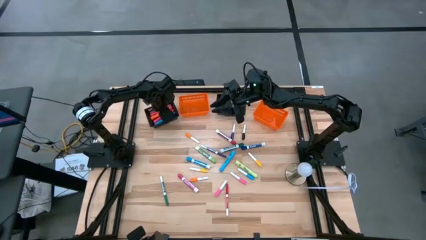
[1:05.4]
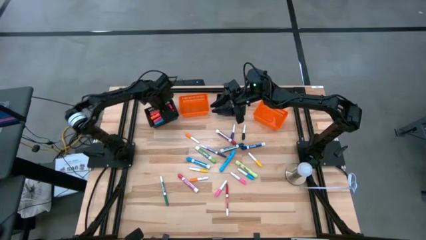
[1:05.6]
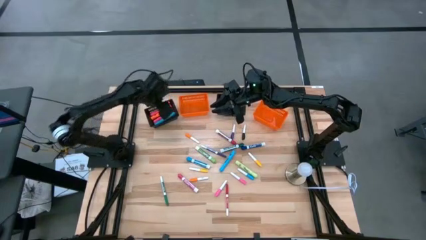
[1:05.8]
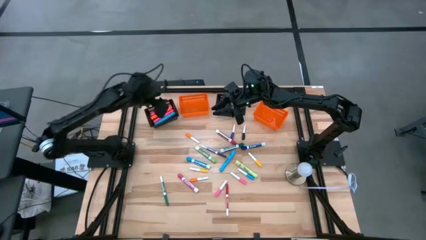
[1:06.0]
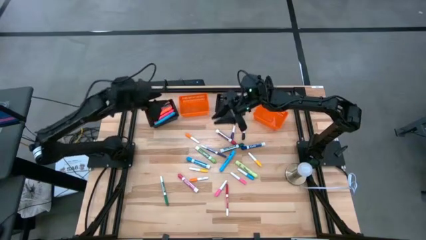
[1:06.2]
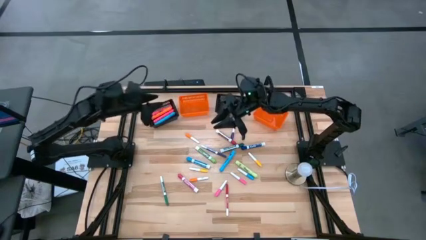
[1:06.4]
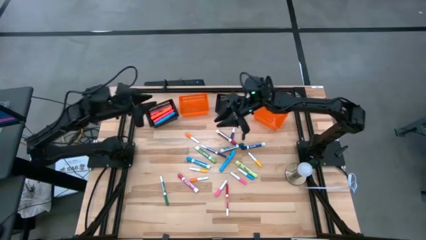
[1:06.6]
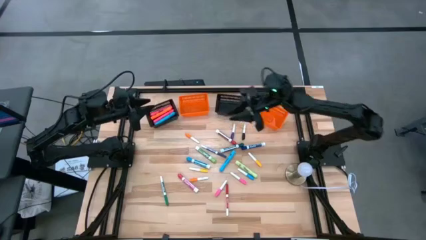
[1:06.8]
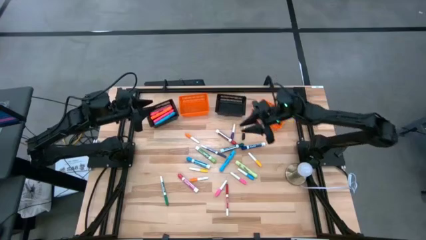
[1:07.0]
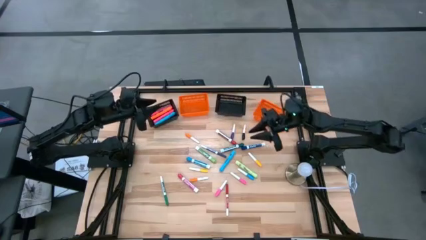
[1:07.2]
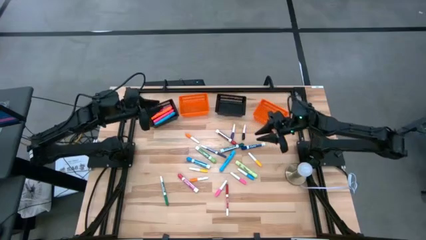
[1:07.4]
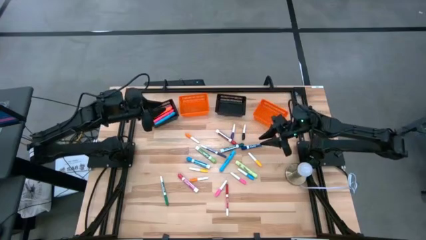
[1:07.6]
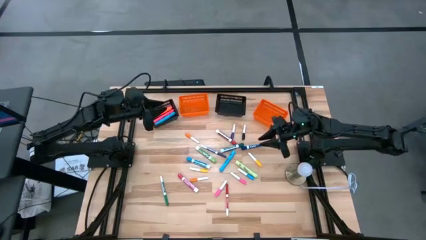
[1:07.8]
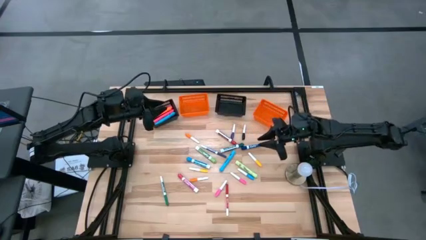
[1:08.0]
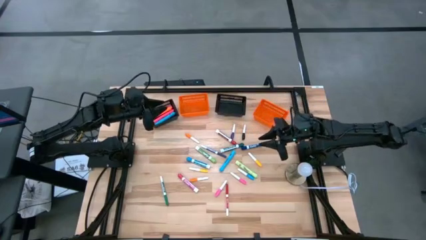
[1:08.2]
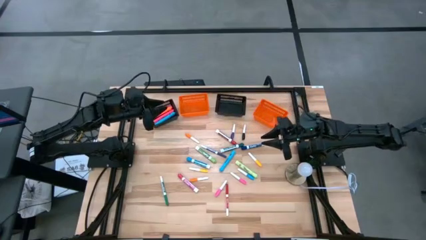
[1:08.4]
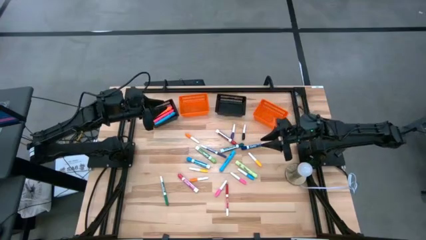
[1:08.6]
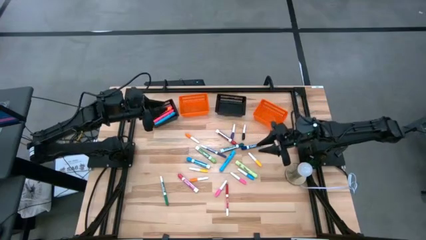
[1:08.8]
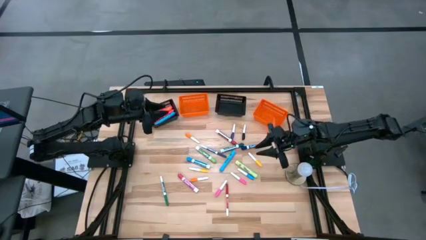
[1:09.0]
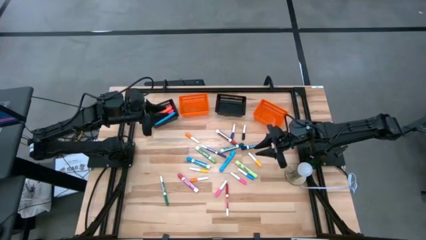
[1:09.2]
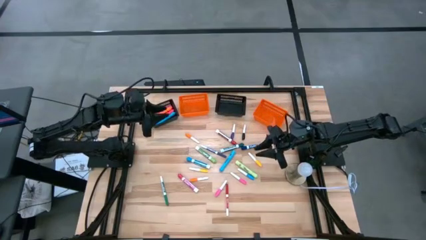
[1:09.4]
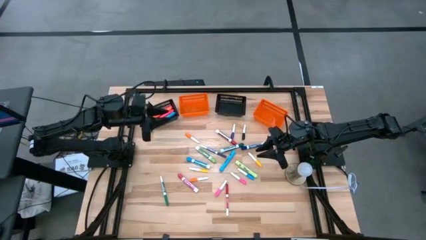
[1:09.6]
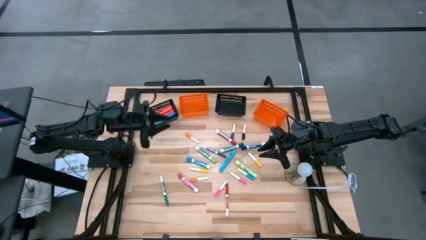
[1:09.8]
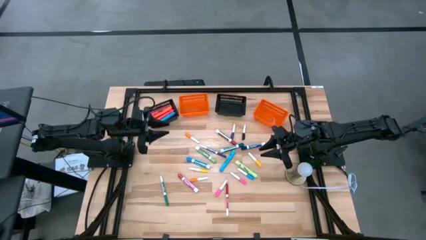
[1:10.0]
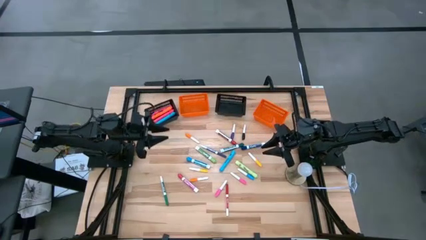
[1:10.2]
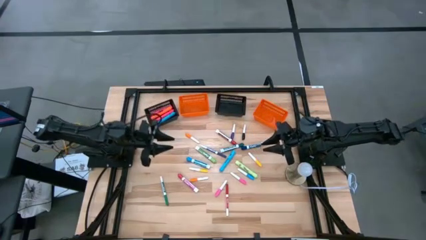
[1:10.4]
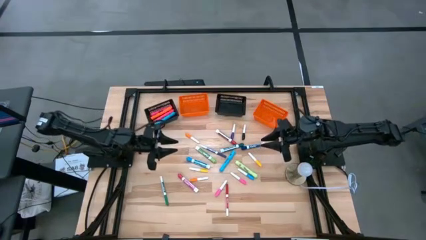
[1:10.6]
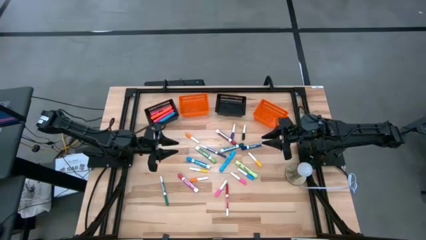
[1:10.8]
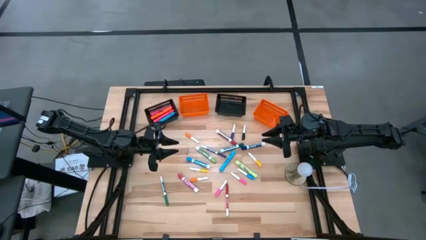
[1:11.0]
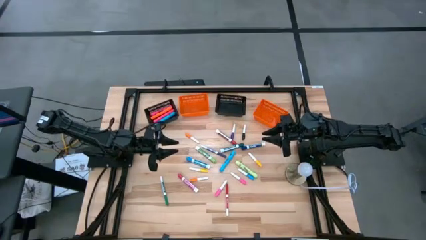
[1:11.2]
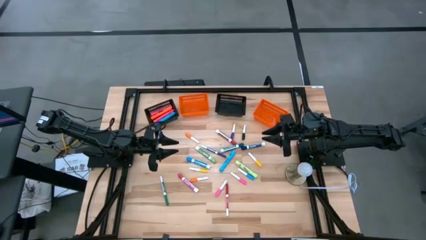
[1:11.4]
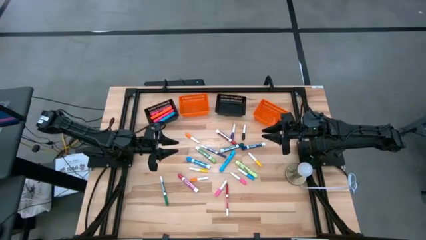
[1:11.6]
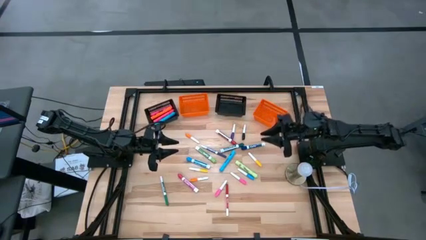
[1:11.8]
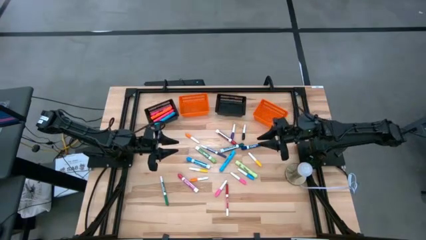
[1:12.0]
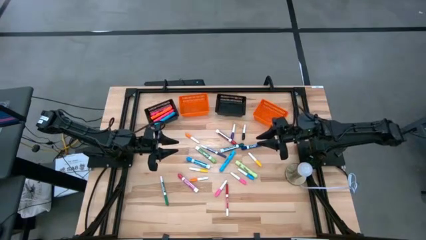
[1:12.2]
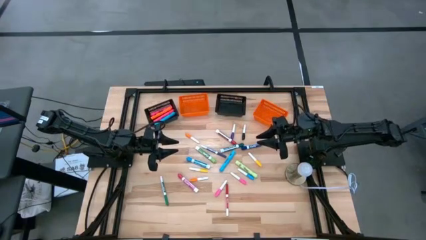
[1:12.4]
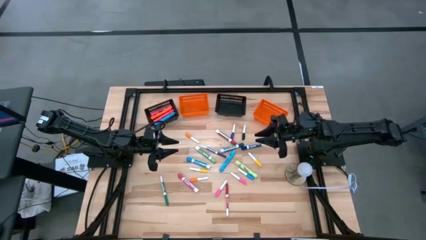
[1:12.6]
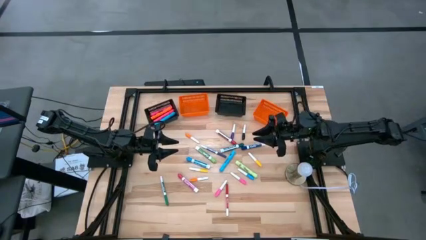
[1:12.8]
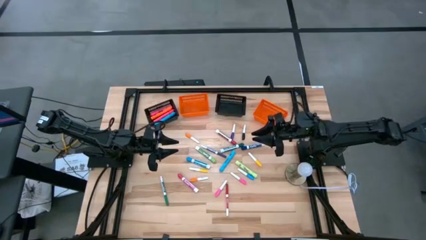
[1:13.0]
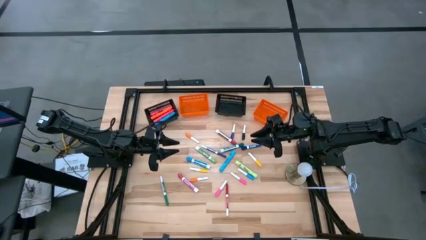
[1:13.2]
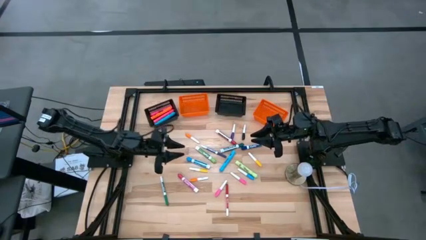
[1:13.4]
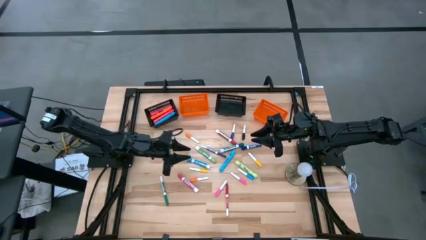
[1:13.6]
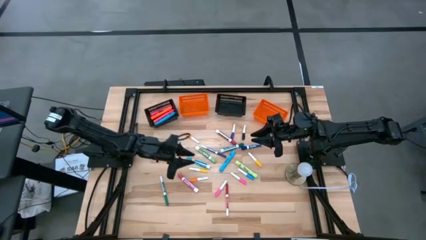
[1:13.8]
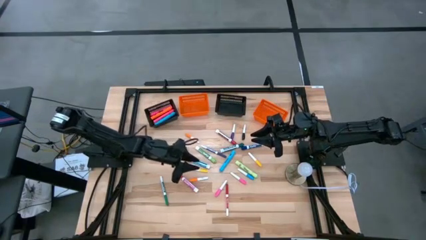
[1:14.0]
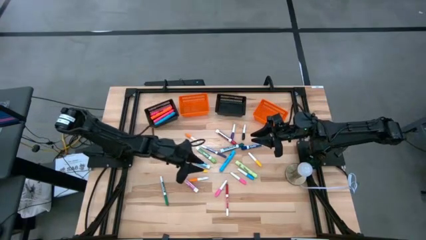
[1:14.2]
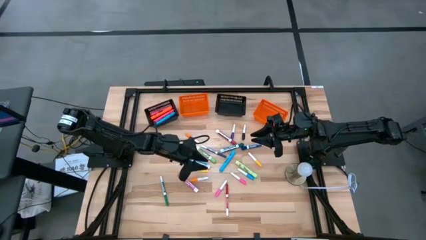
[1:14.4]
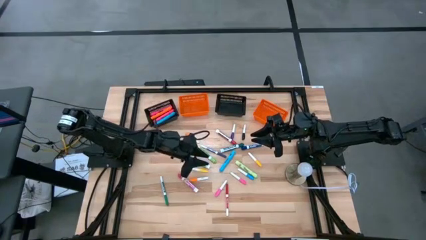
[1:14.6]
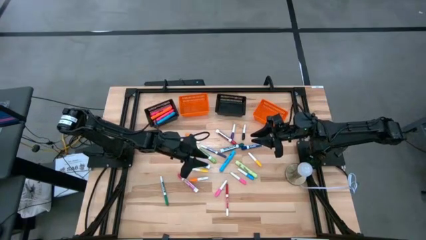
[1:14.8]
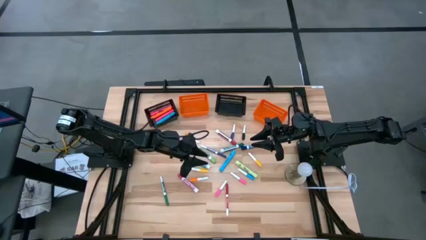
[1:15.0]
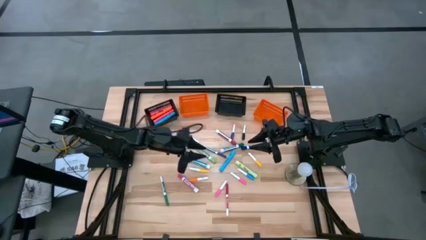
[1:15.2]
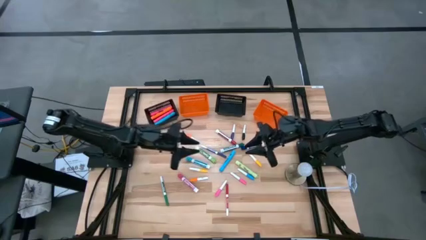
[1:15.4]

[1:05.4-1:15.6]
Task: Pick & Place Markers
Put the blue highlighter pen into the left black bin

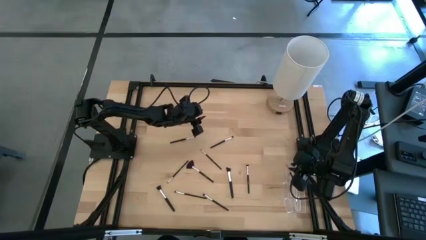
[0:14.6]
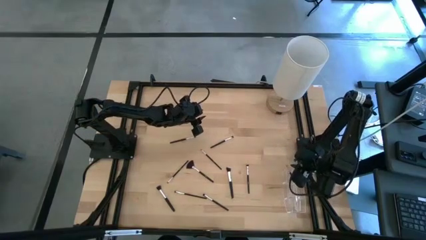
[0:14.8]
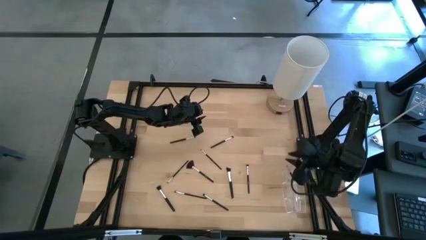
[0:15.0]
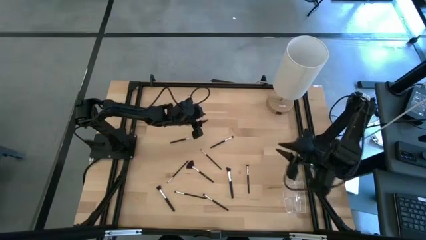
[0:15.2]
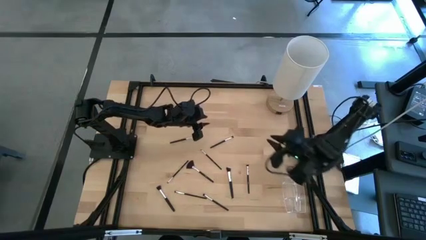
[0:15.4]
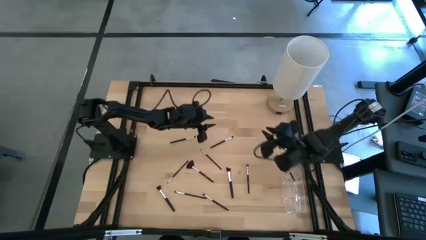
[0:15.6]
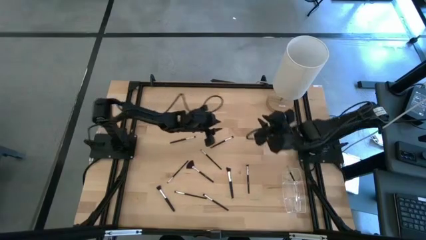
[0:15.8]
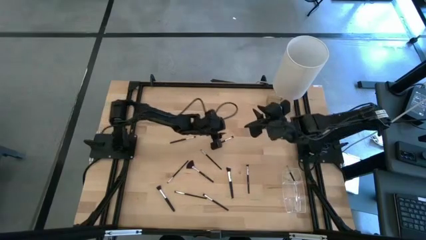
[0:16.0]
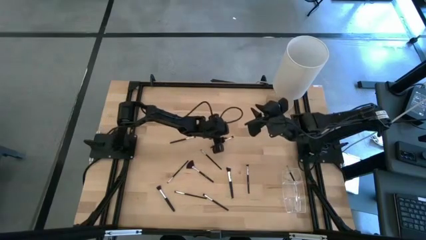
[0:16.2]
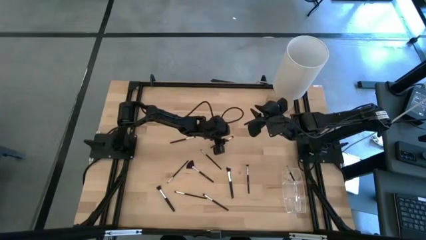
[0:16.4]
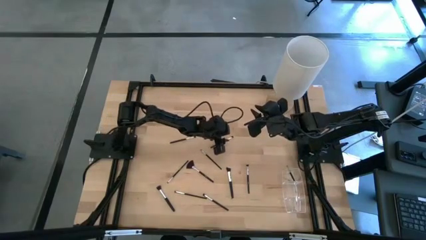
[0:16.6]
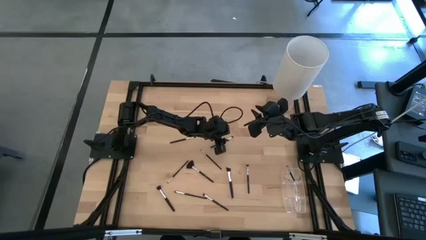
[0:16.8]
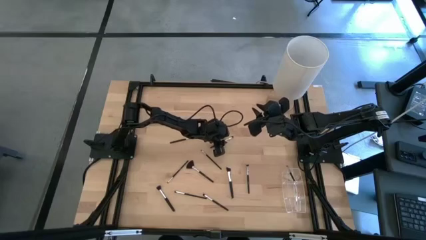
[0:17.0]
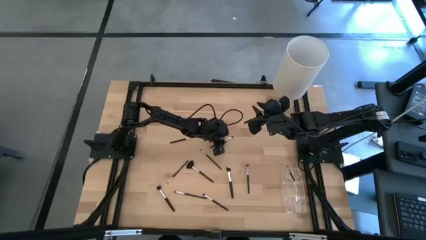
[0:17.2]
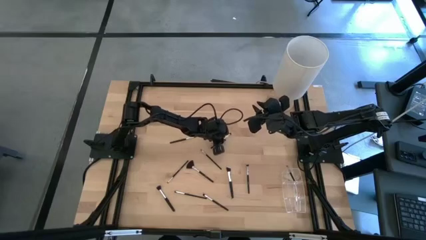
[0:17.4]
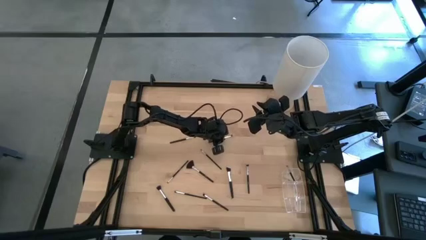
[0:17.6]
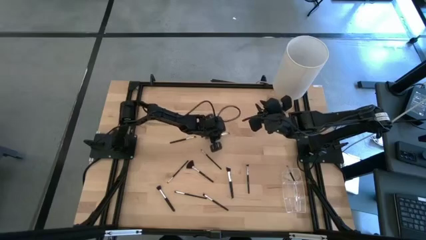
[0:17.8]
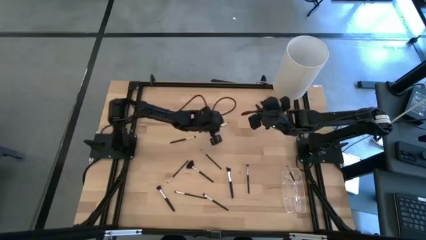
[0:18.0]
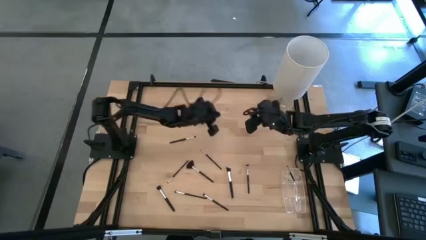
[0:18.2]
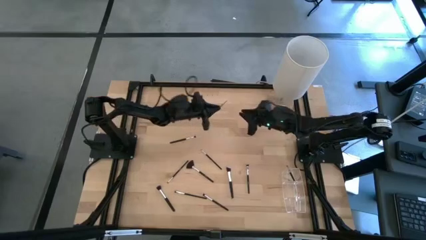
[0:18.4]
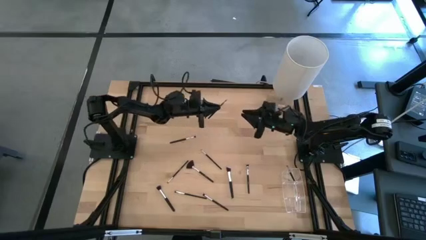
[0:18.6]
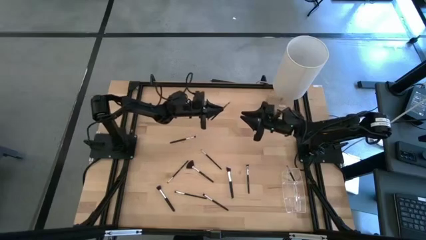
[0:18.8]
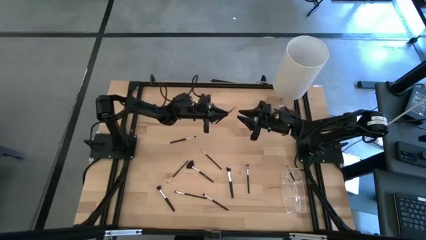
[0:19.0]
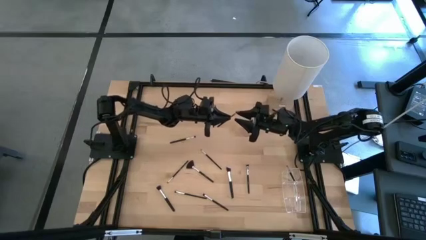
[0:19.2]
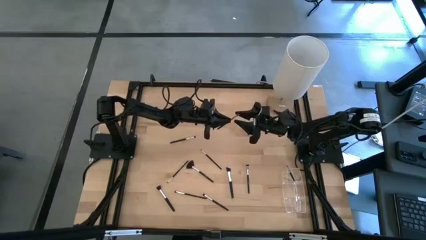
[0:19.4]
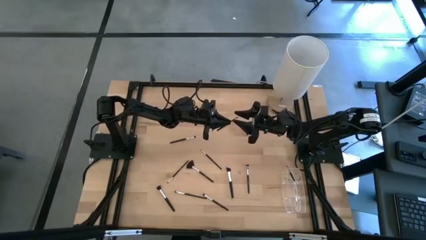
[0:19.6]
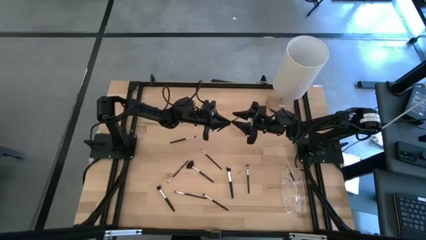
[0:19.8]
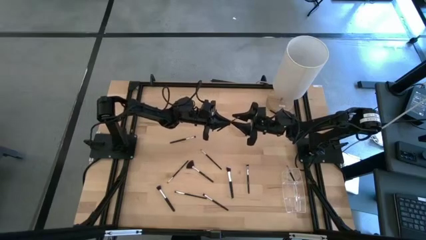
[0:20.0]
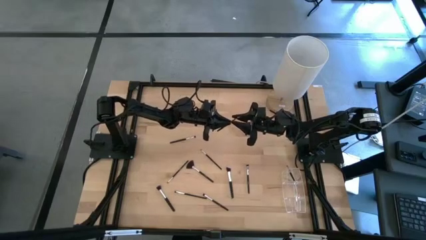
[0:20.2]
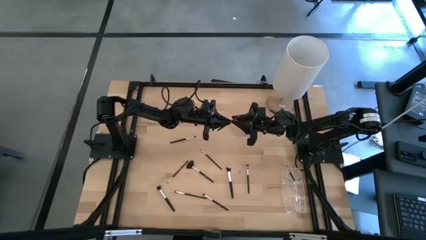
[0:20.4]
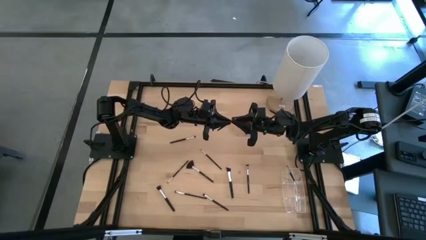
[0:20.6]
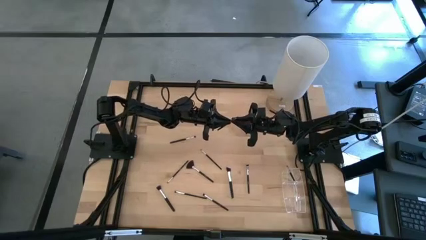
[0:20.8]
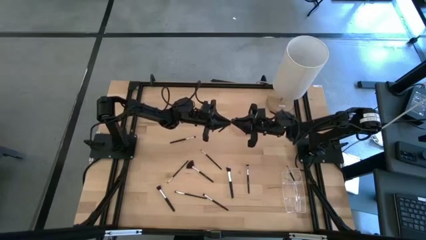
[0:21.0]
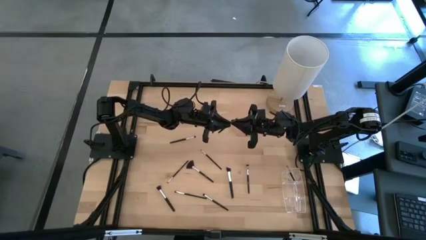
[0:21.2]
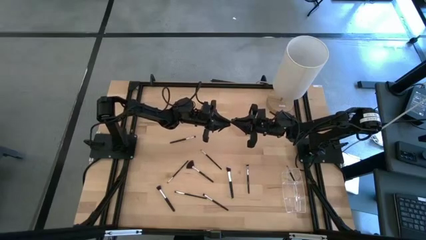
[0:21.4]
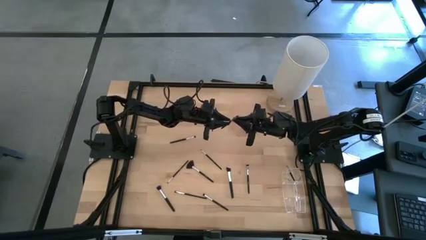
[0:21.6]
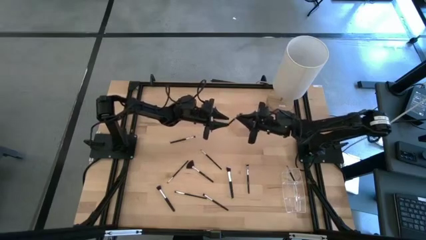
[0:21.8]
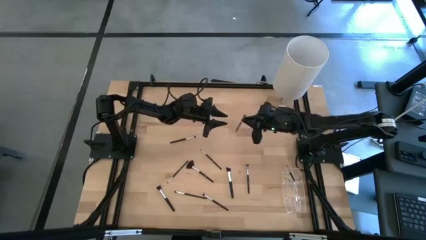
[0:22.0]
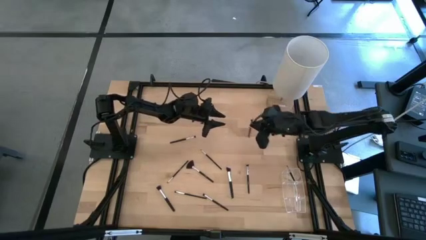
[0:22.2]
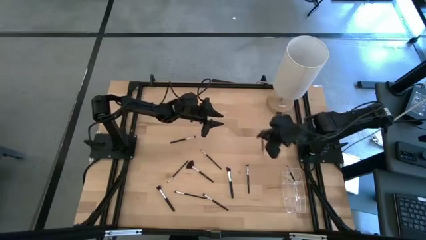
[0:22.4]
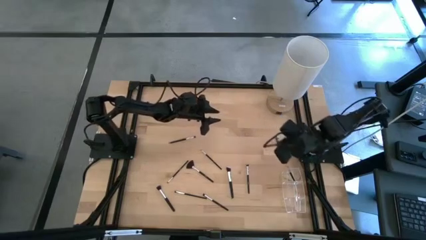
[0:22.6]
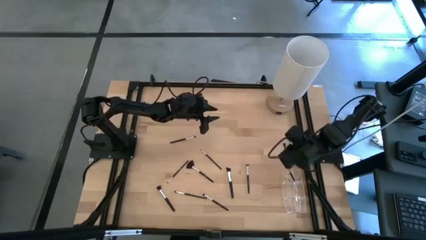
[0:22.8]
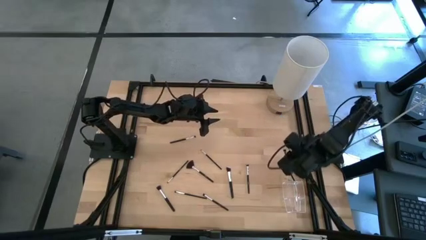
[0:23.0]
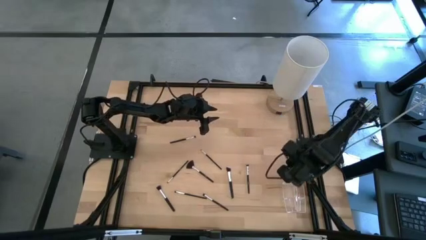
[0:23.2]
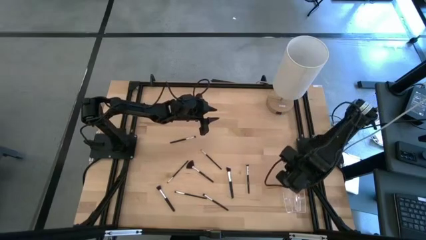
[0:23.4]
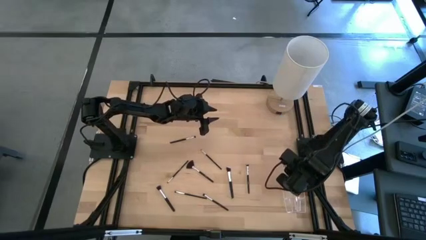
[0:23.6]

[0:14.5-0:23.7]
Task: Put items in baskets/containers
Put the foundation brush into the left section of the transparent organizer
